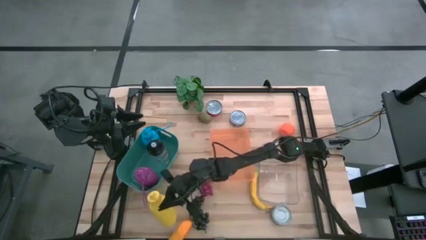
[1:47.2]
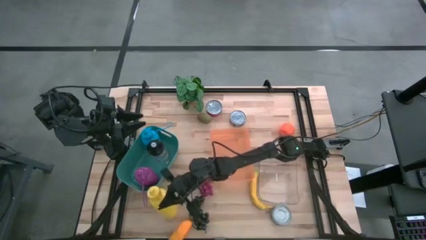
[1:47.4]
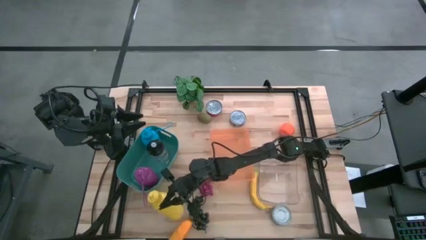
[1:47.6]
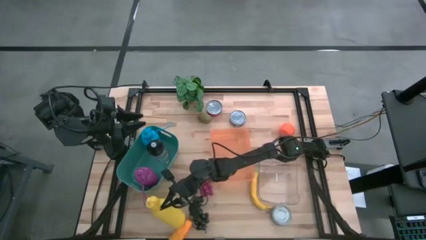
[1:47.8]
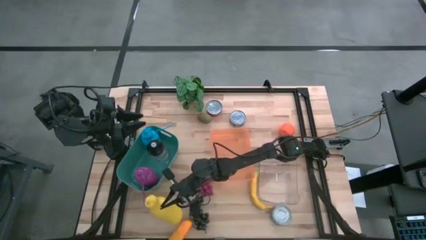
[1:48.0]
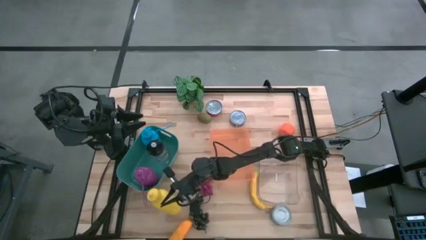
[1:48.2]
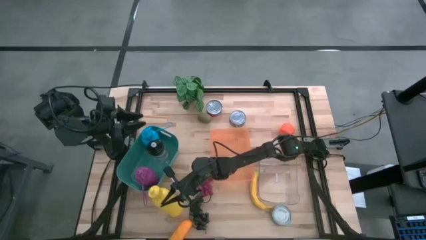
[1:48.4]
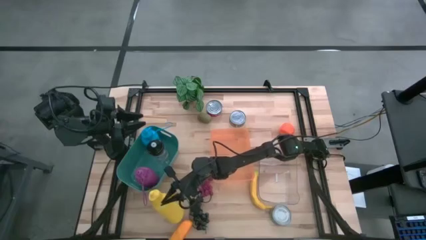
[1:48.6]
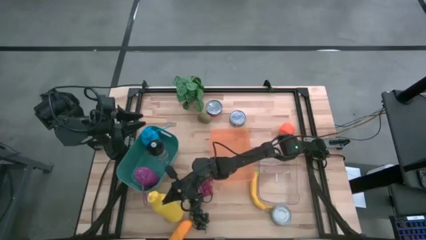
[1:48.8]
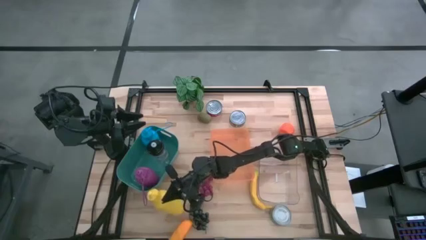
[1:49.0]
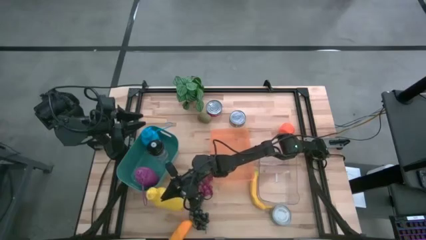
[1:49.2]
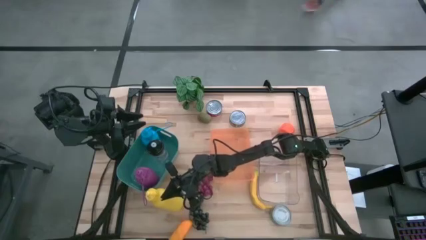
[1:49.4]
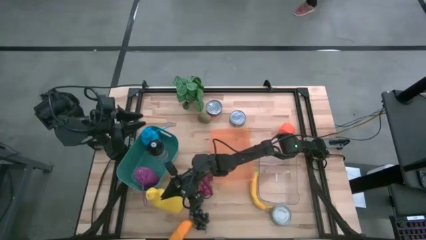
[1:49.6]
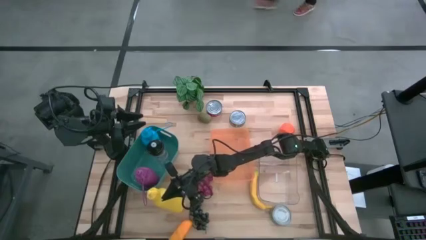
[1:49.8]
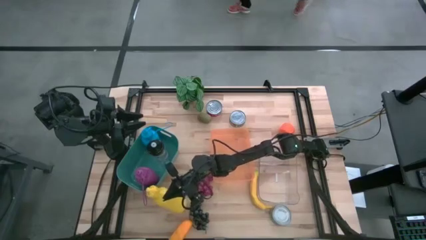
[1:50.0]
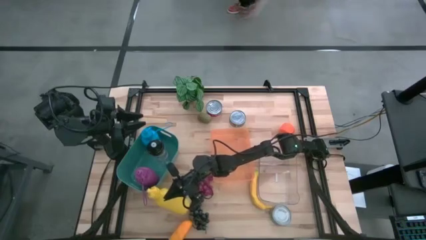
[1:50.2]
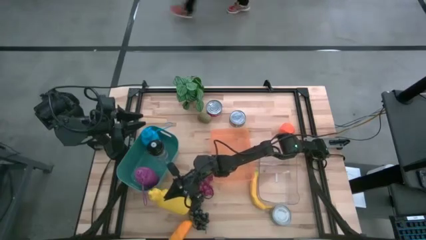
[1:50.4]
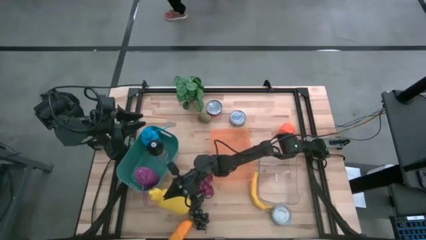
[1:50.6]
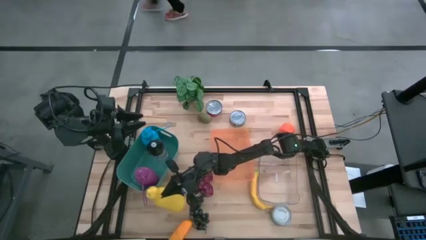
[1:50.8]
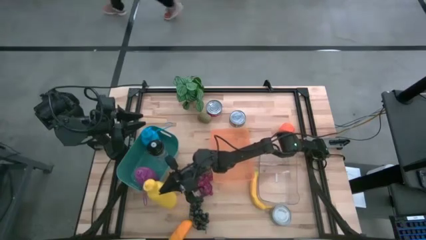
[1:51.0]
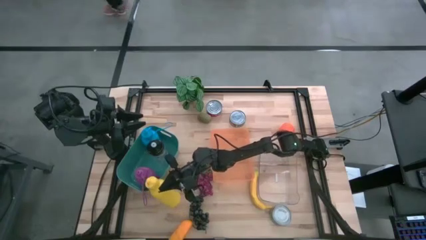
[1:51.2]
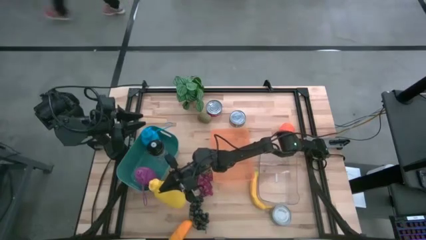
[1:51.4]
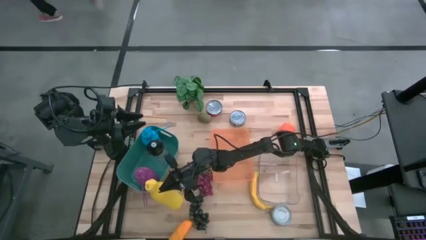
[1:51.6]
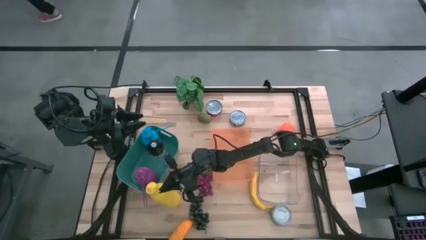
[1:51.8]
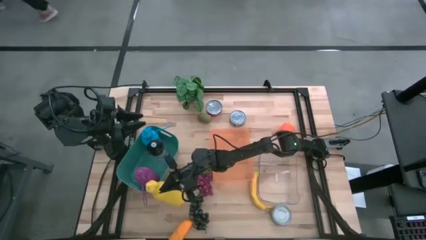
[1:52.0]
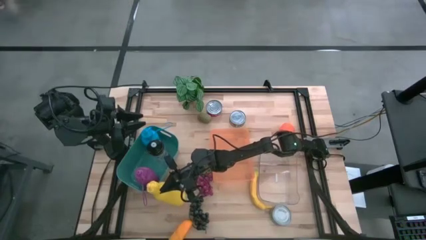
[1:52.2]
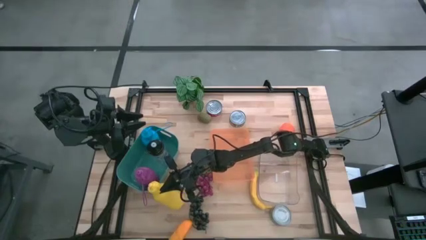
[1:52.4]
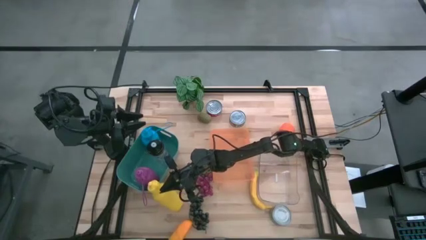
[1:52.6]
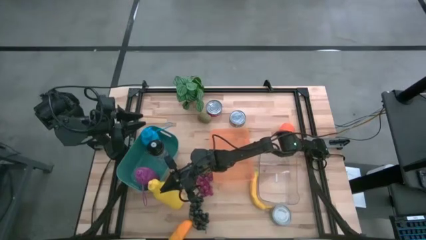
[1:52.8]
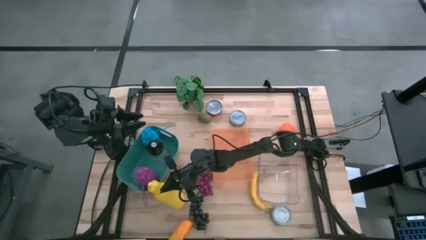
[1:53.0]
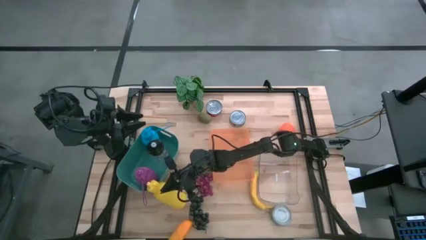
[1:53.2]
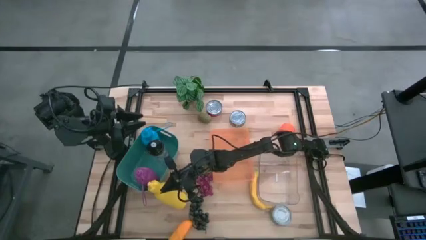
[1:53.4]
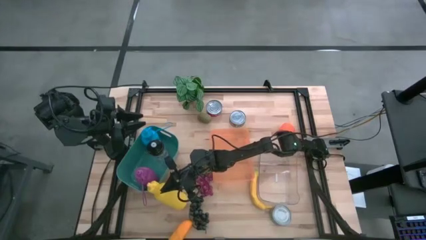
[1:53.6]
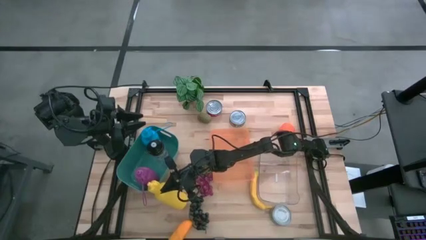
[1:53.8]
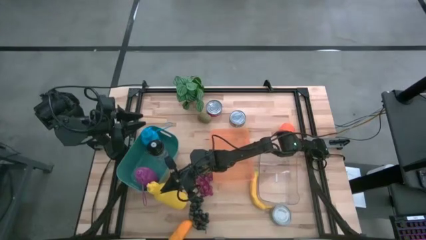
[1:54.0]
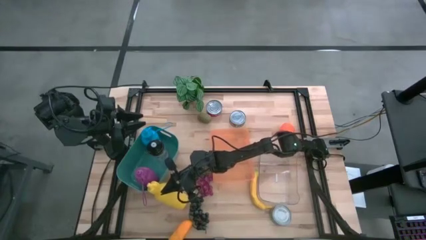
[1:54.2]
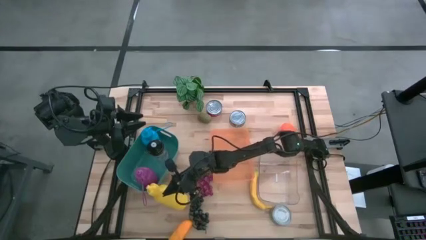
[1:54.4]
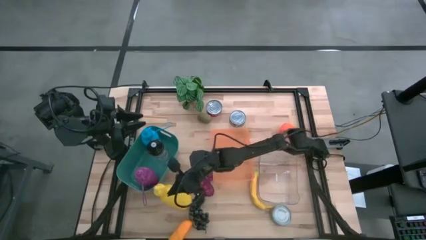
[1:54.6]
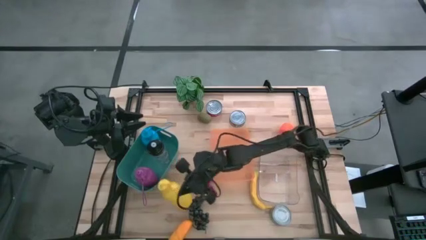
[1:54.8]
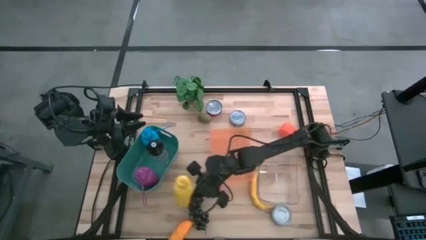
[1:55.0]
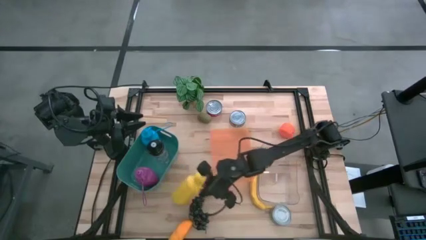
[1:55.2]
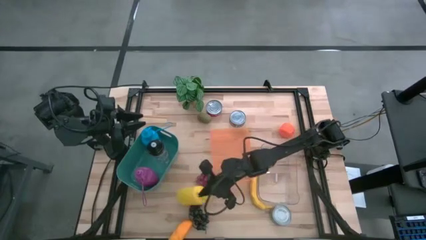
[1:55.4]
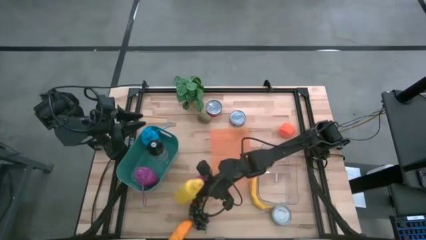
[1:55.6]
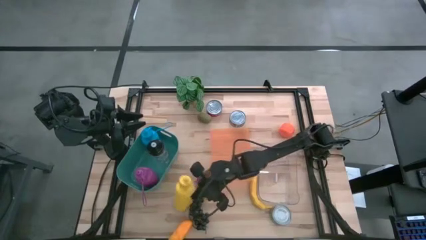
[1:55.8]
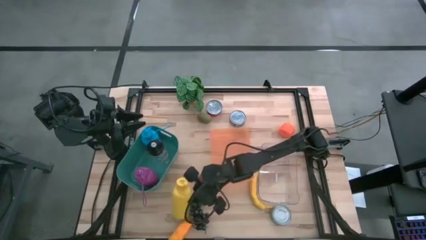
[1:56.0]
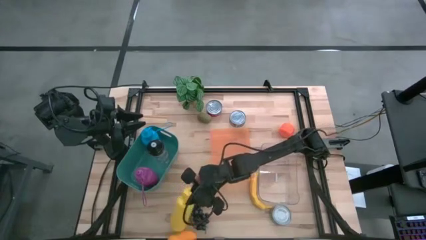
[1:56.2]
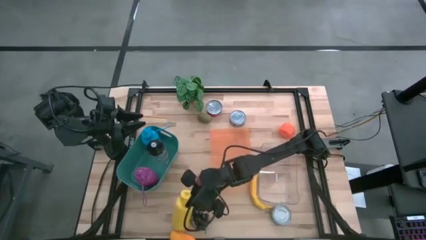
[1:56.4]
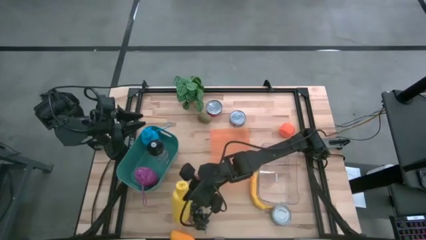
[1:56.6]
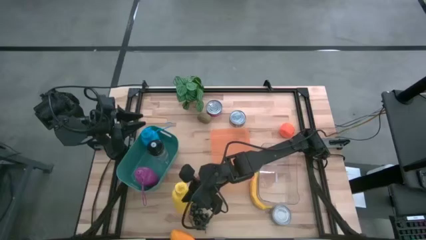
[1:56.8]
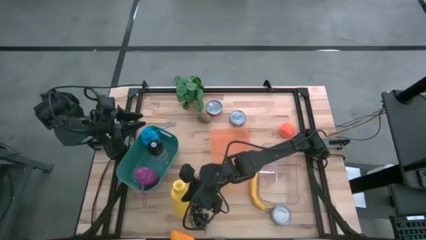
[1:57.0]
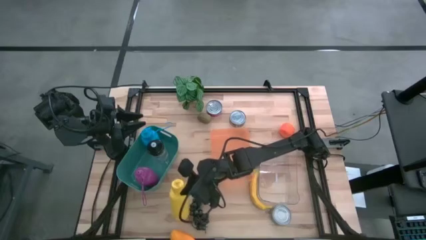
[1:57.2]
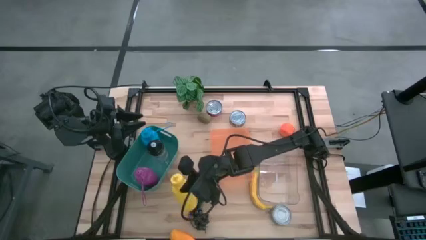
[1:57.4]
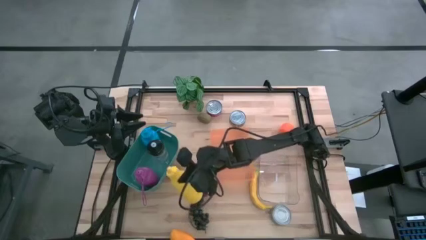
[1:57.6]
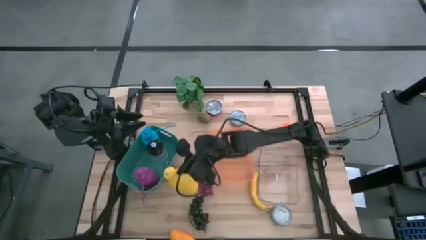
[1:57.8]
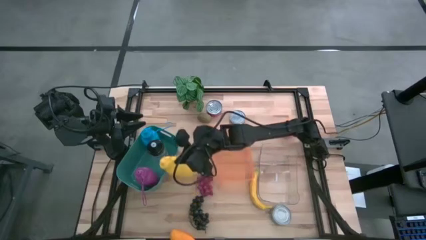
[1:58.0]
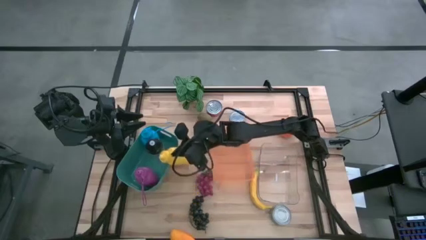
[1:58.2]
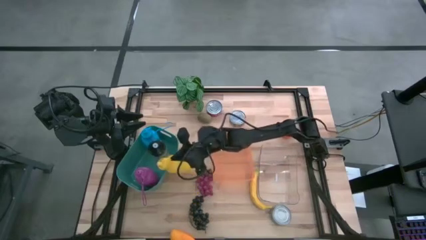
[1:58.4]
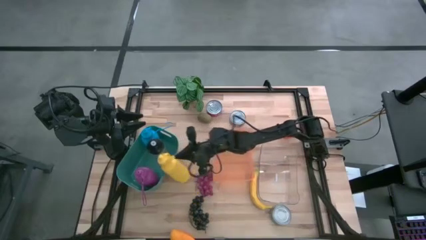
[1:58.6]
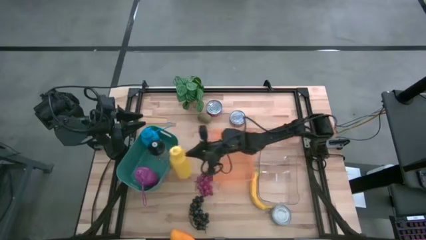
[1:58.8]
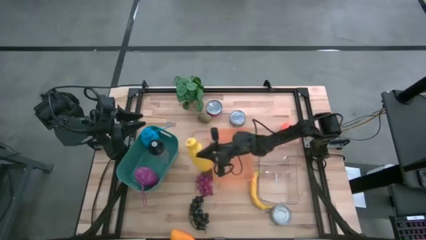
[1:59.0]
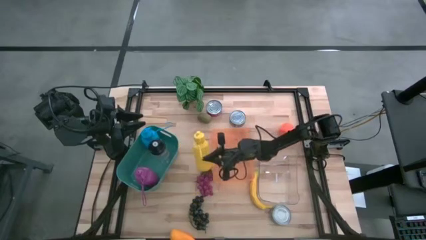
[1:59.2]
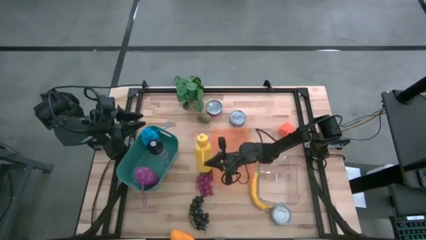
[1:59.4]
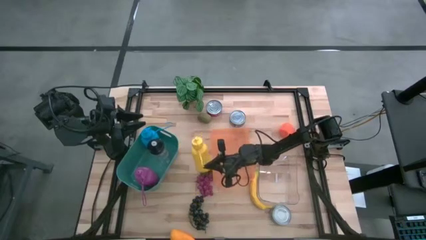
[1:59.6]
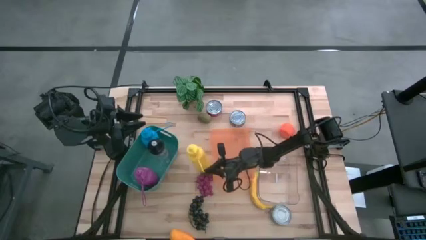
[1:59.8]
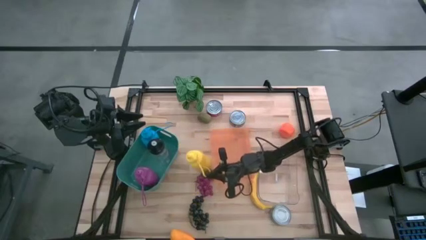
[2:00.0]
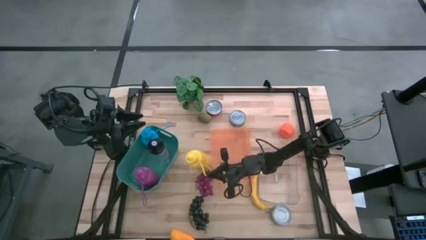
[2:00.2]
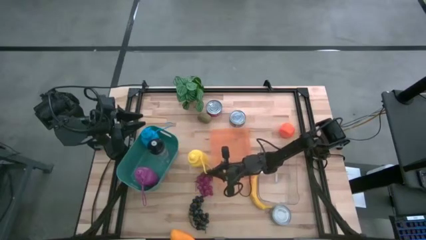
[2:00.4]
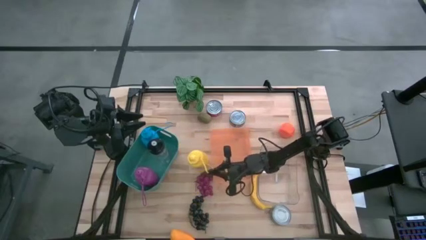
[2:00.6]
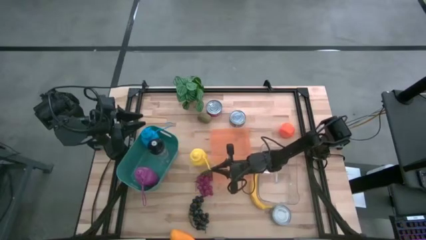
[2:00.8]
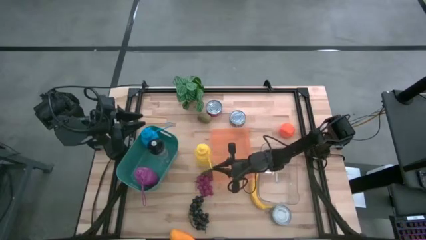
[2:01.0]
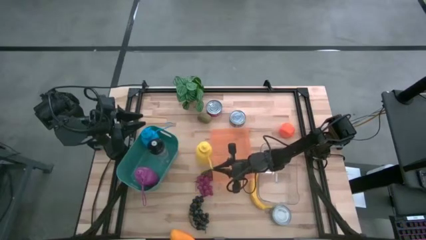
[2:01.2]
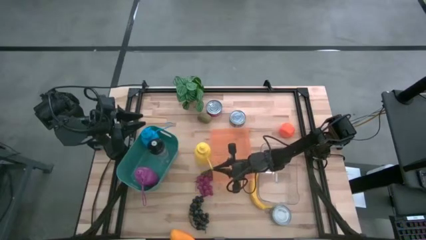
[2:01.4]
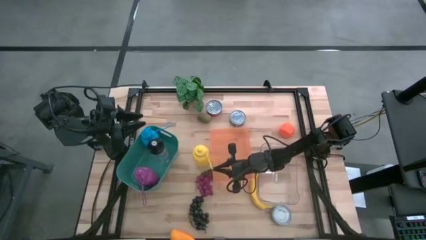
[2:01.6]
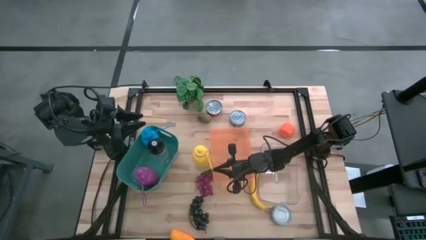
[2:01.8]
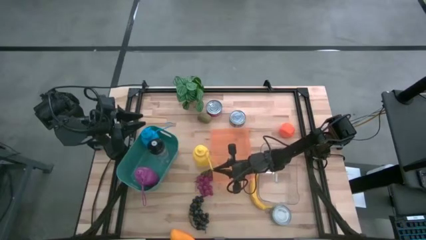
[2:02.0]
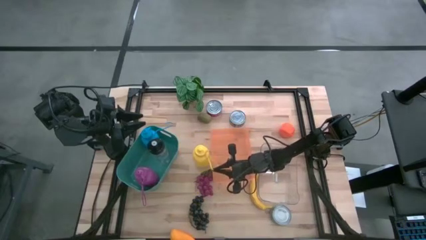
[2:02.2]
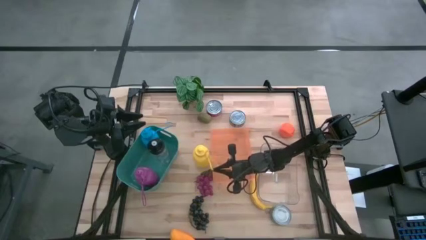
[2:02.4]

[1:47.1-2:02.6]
Task: Pick & Place Food Item
Put the yellow water bottle into the green bin
